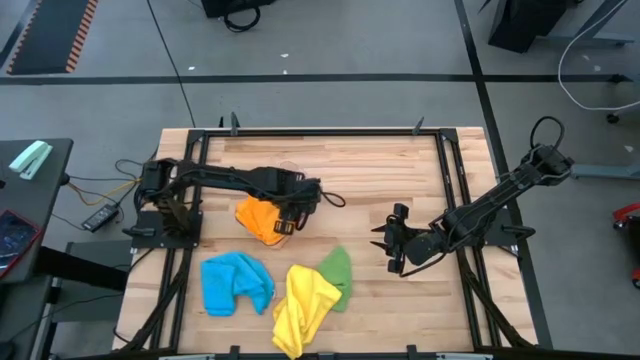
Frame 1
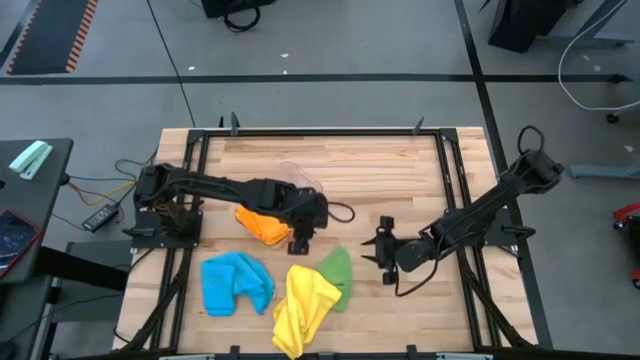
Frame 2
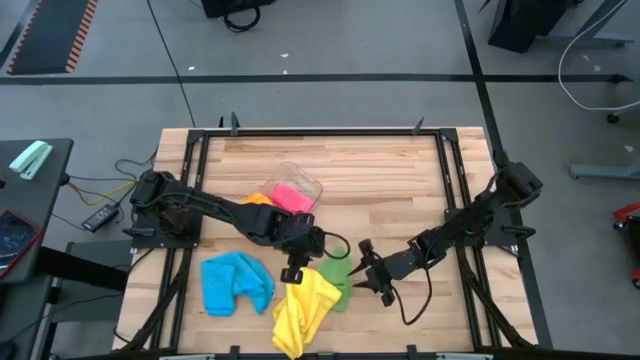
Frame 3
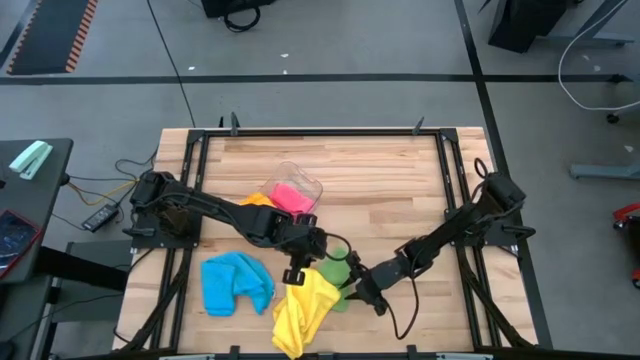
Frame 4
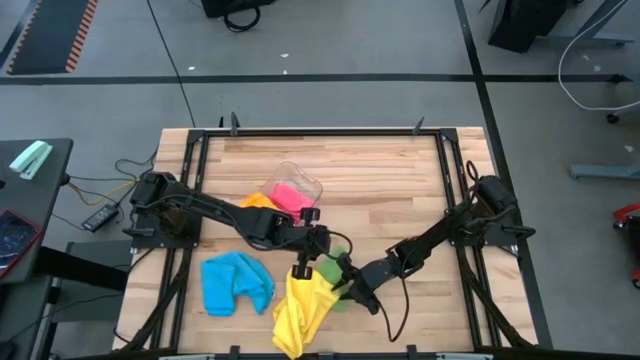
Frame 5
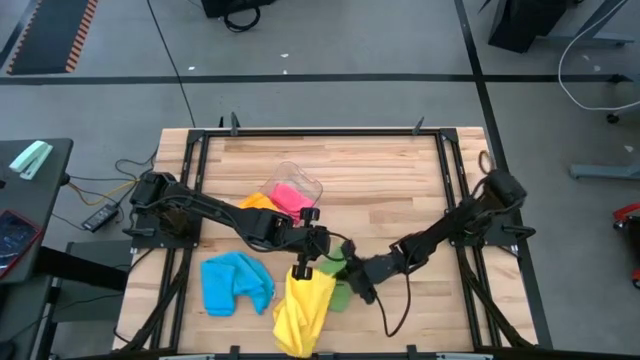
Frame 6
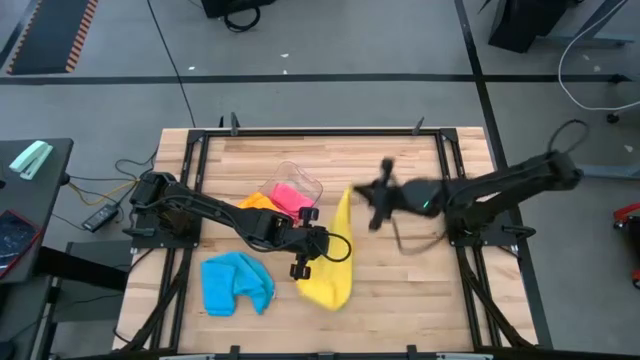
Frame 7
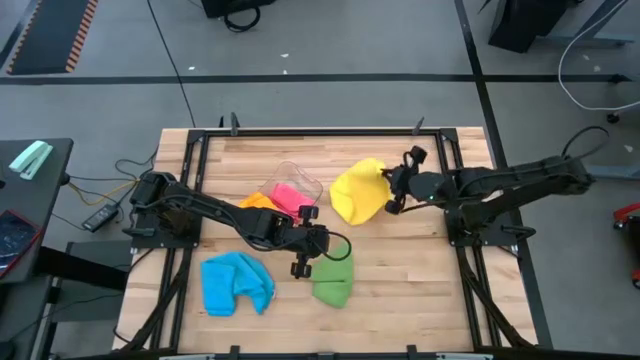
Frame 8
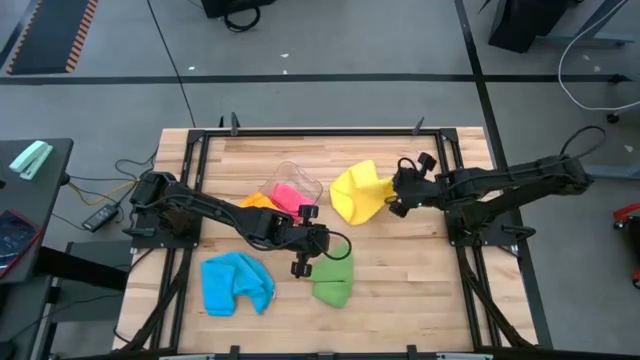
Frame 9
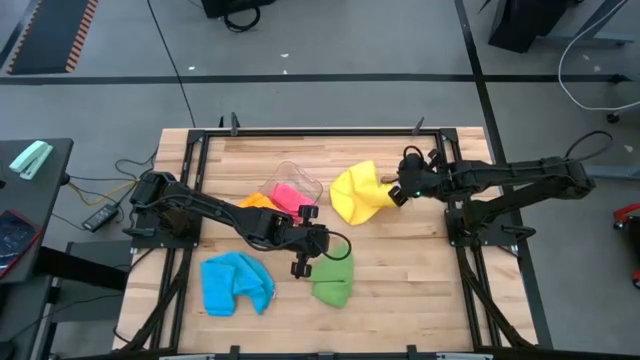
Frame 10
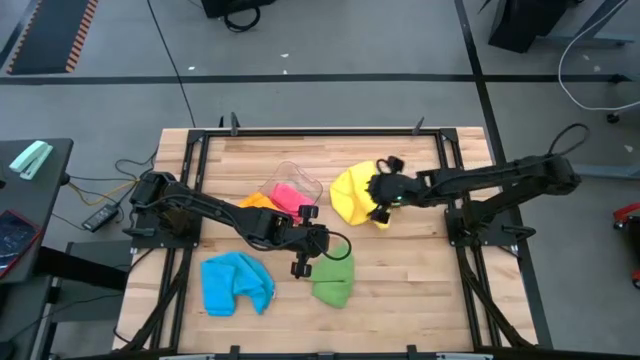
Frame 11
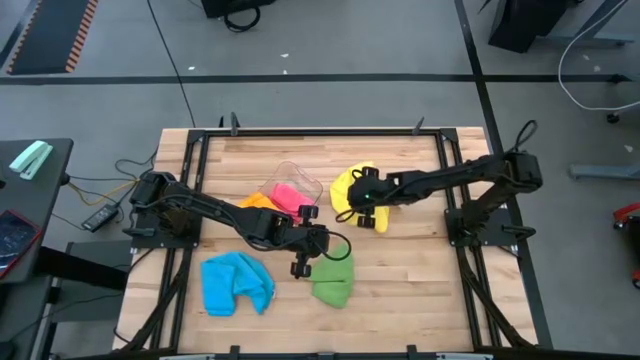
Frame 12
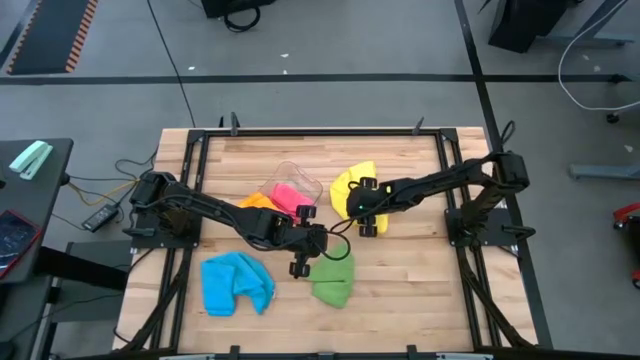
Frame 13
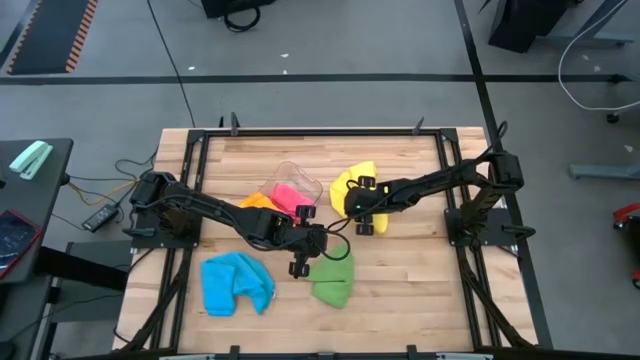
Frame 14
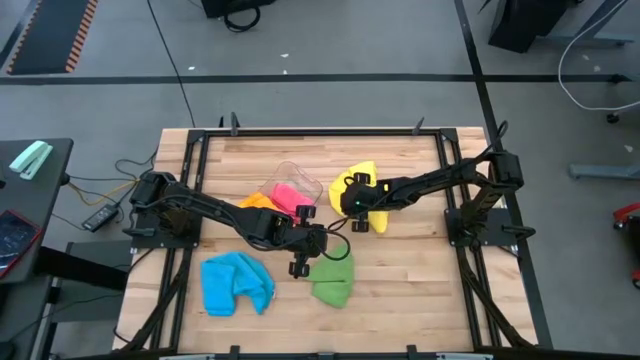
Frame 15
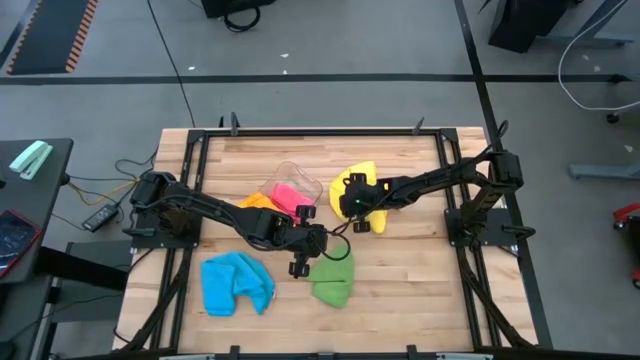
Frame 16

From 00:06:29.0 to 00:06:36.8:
Task: Fold microfiber towels
Fold the yellow microfiber towel

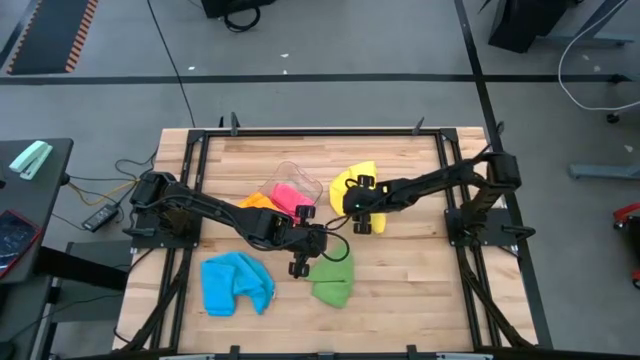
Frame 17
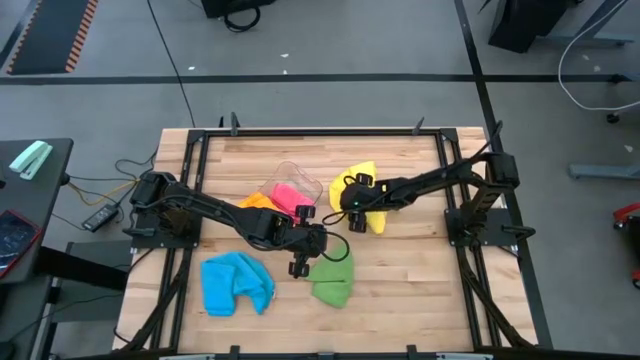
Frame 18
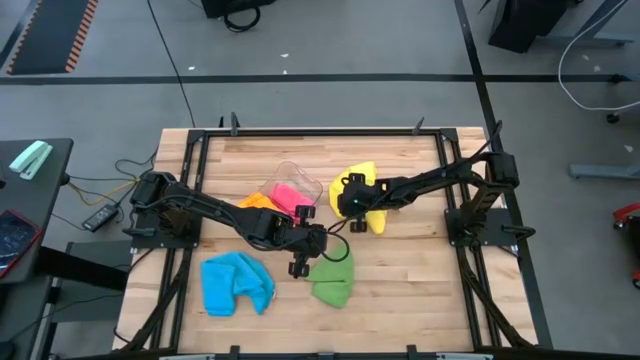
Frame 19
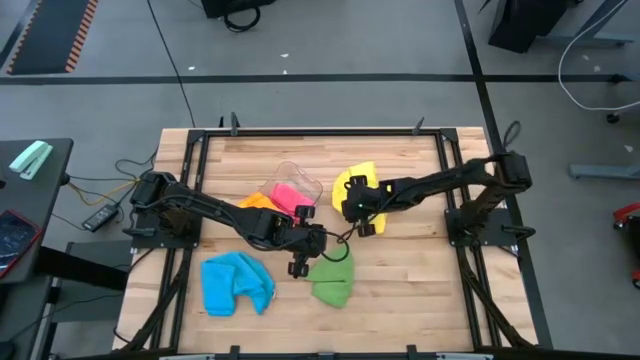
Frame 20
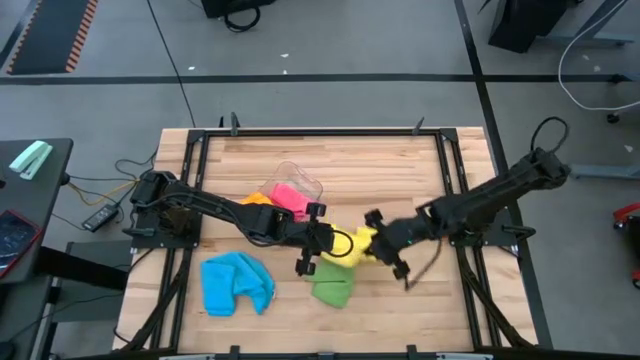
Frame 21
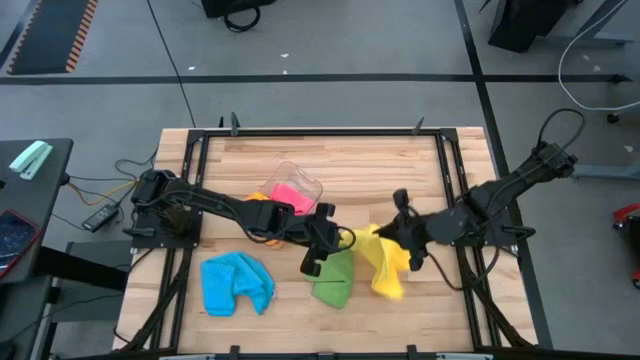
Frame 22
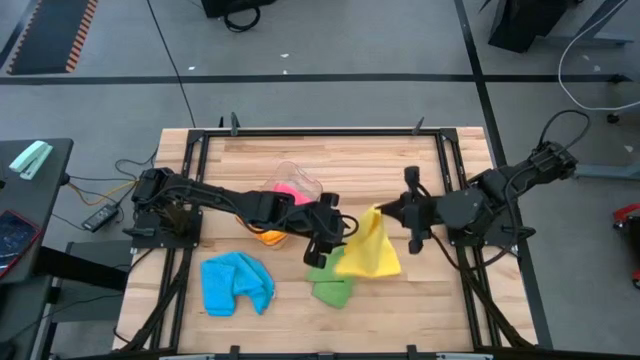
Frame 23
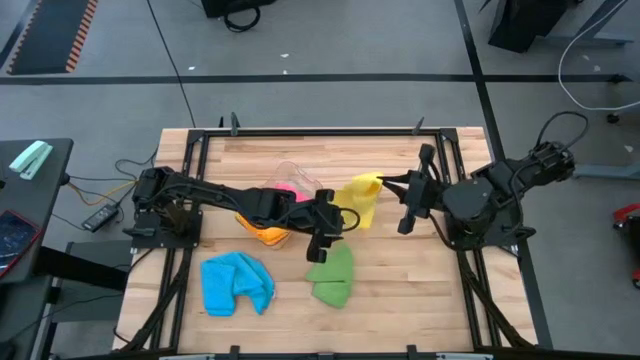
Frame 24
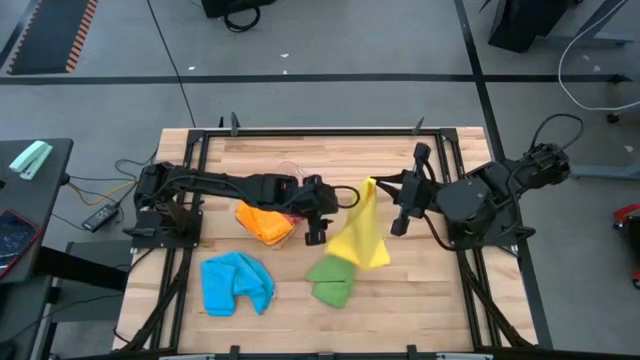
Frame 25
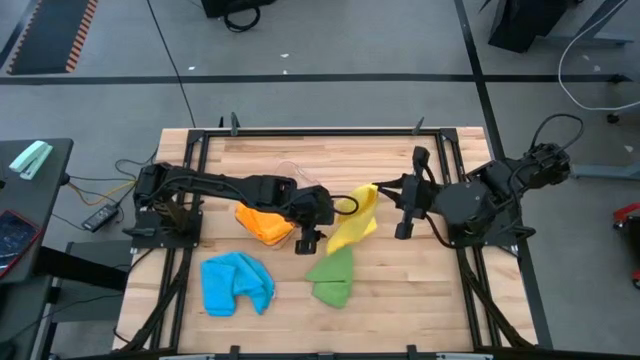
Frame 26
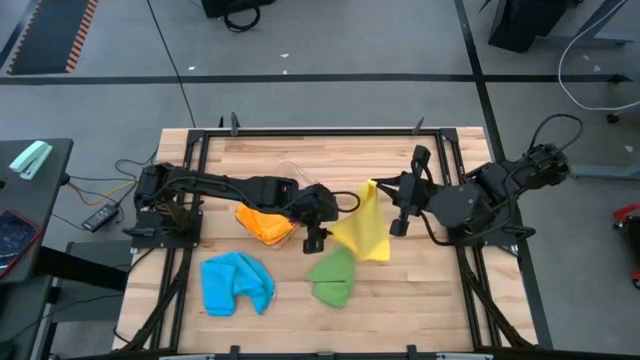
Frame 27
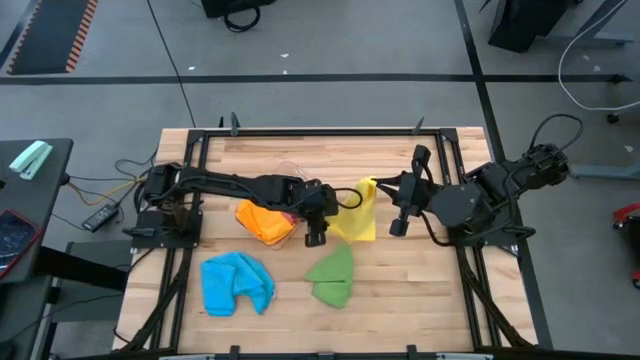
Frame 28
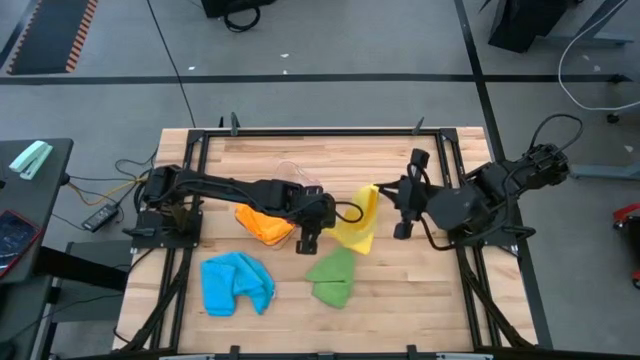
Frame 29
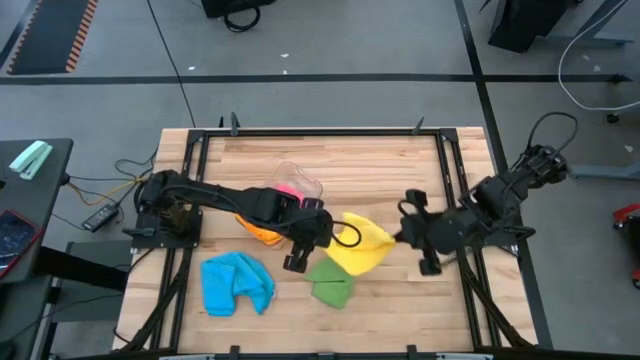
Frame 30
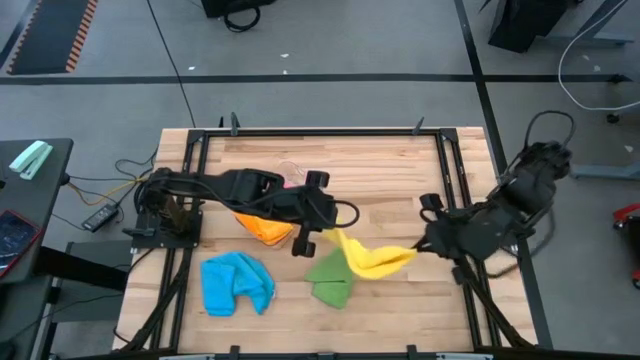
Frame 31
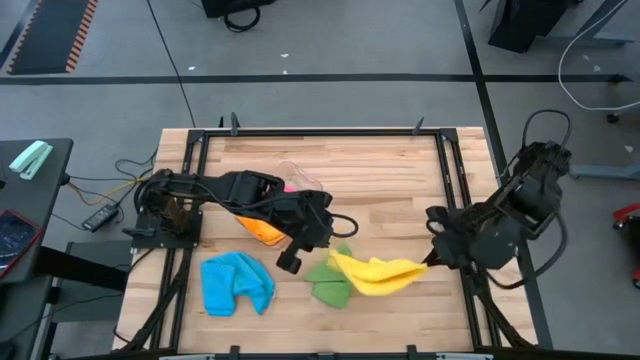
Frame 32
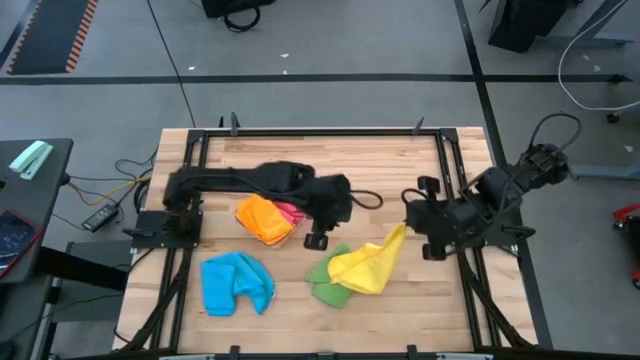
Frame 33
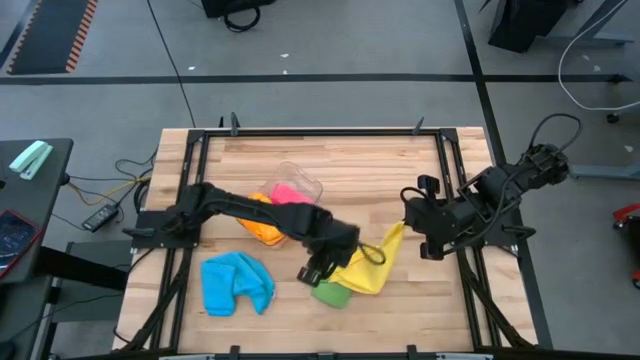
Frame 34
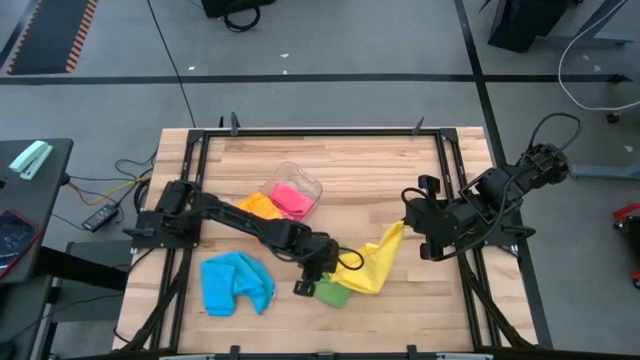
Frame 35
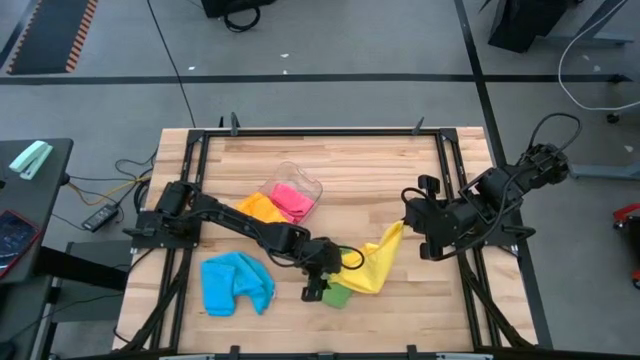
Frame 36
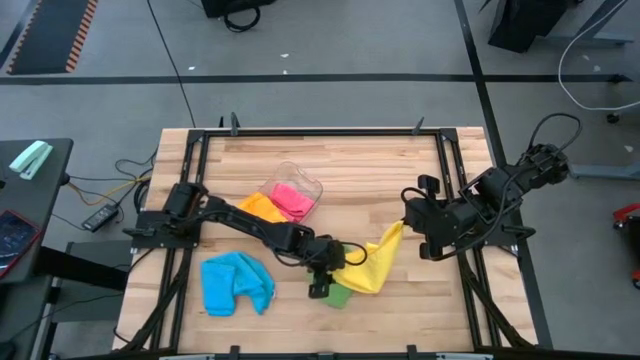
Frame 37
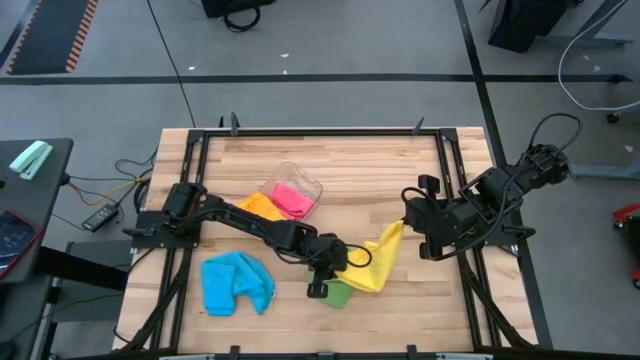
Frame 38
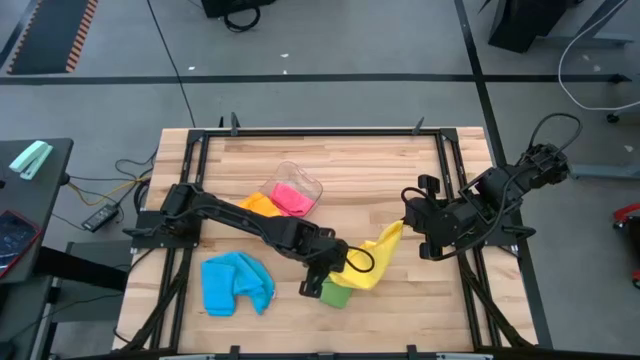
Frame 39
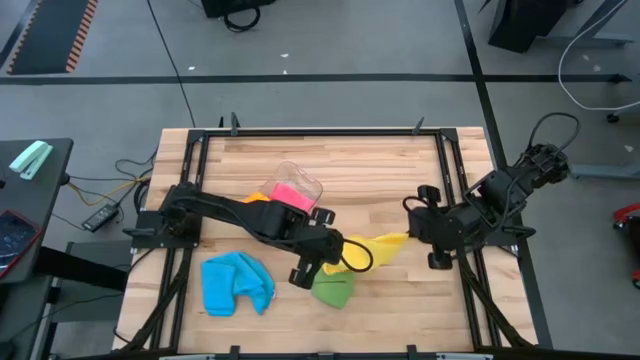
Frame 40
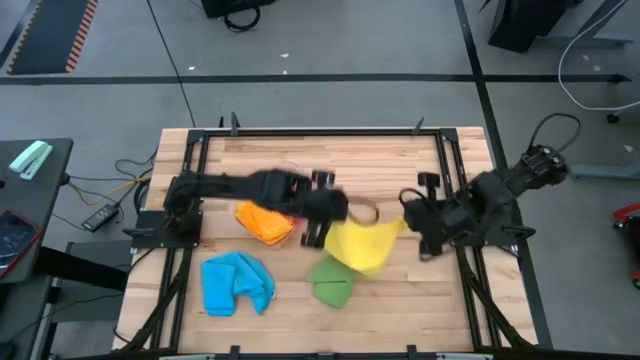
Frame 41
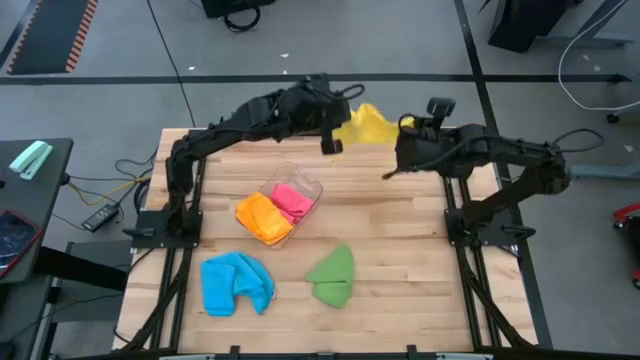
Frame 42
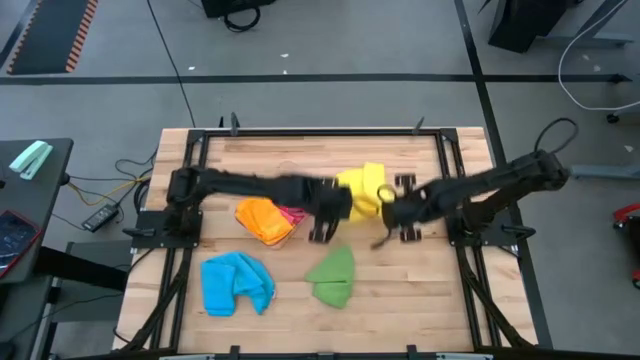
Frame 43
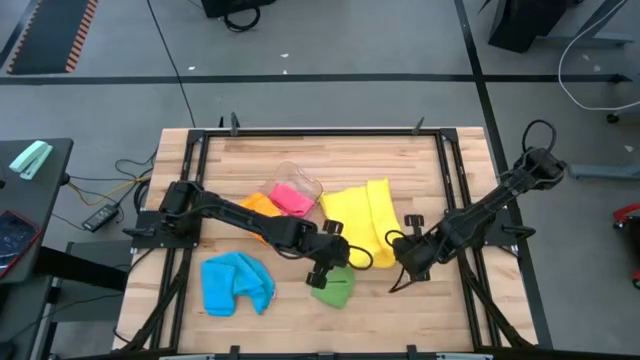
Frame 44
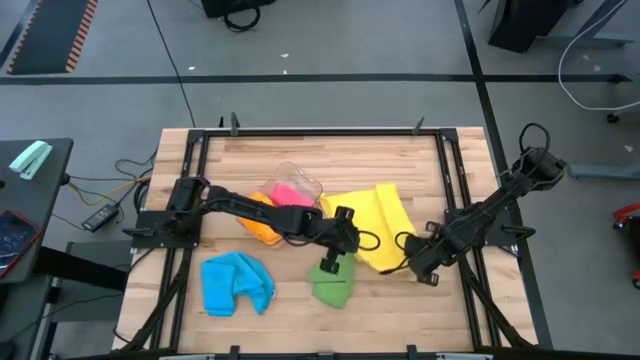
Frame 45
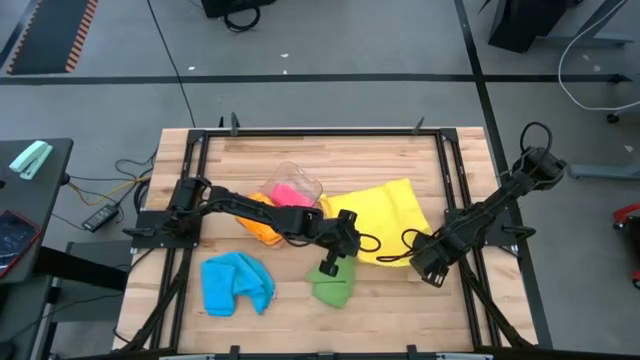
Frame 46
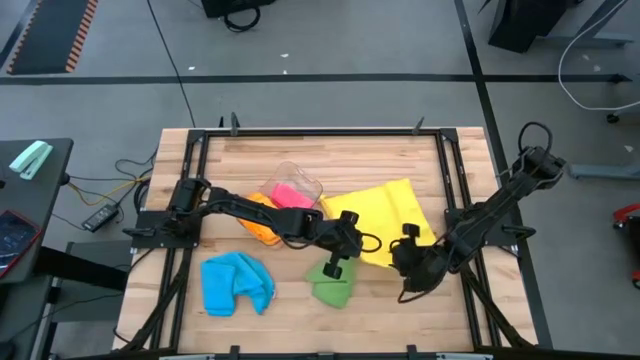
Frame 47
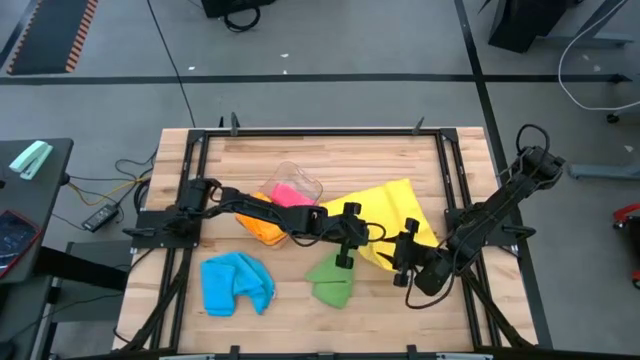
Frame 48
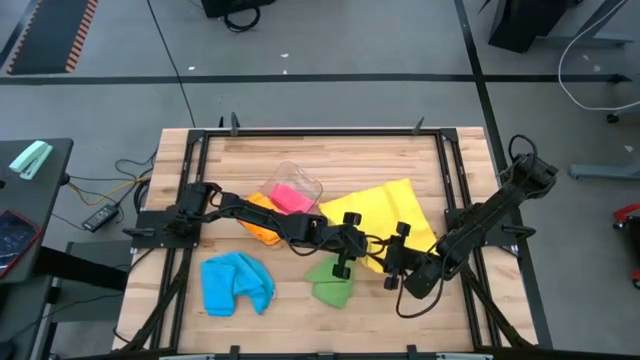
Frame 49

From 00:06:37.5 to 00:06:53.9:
Fold the yellow microfiber towel
